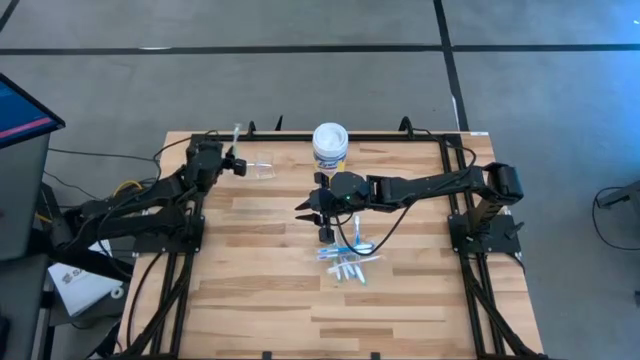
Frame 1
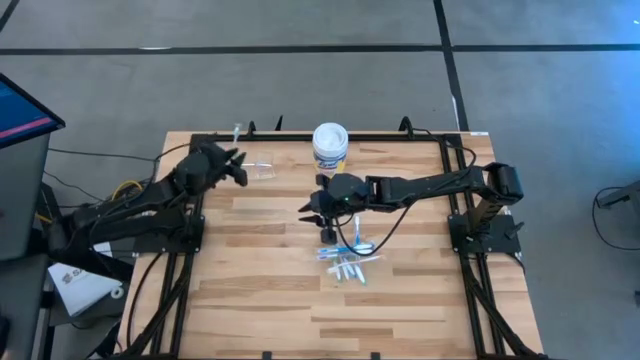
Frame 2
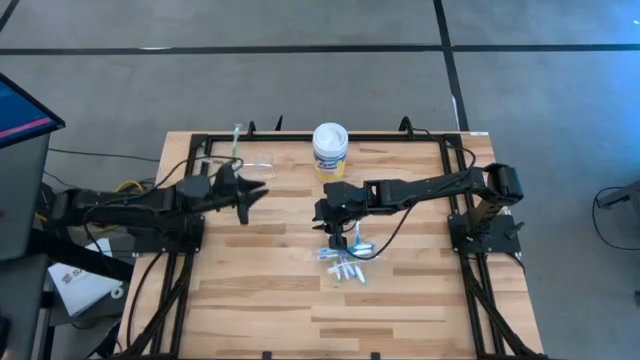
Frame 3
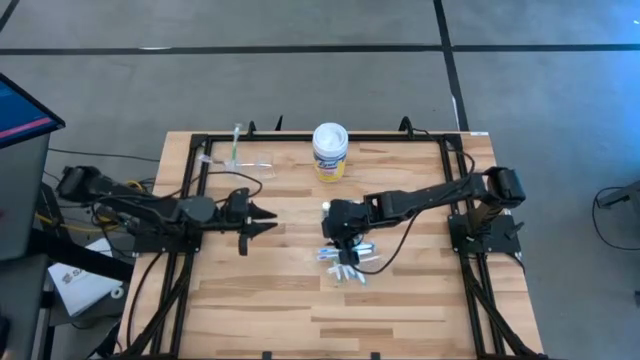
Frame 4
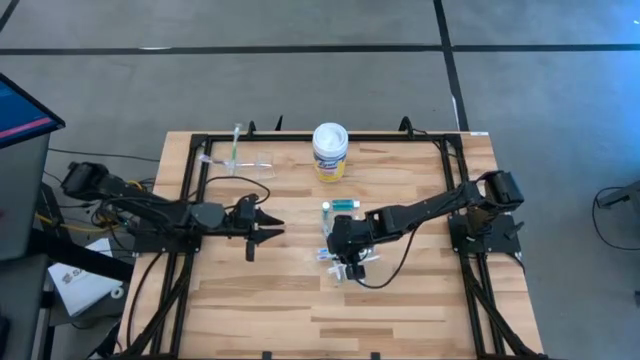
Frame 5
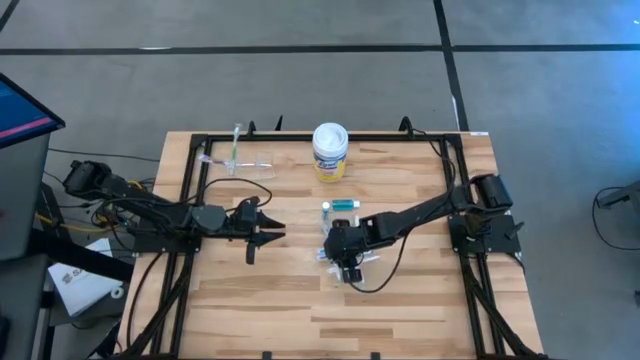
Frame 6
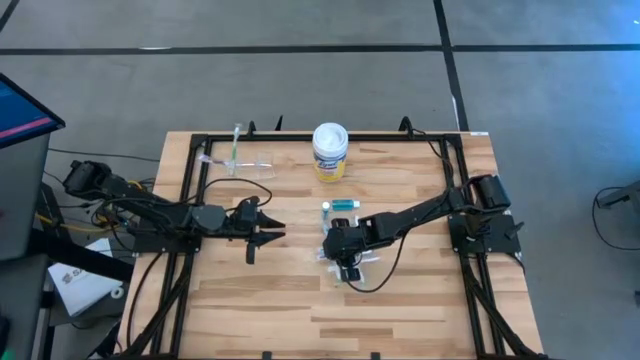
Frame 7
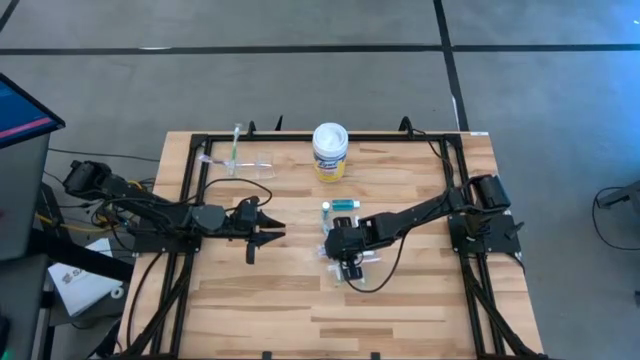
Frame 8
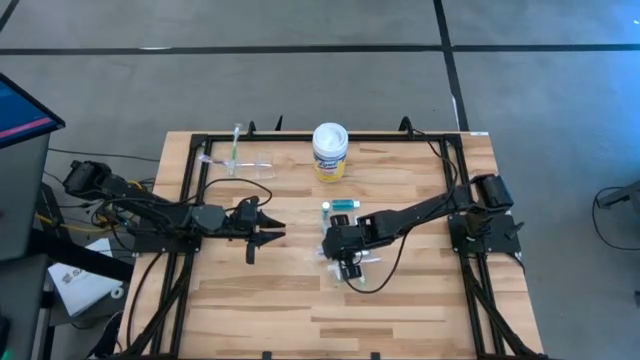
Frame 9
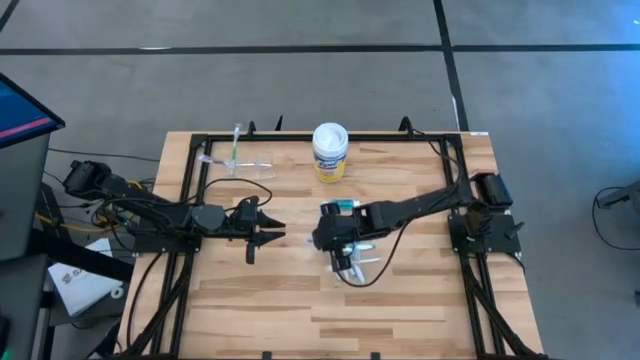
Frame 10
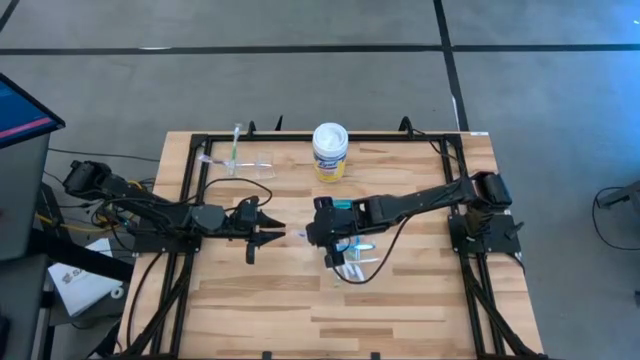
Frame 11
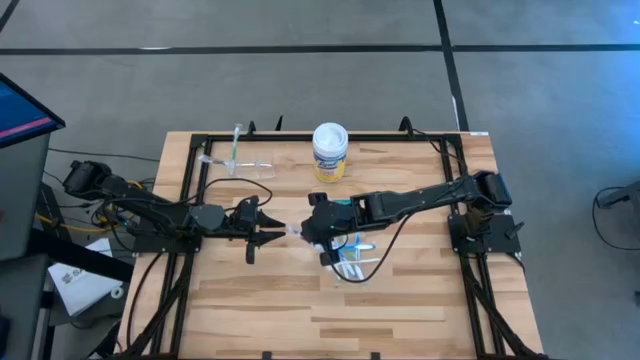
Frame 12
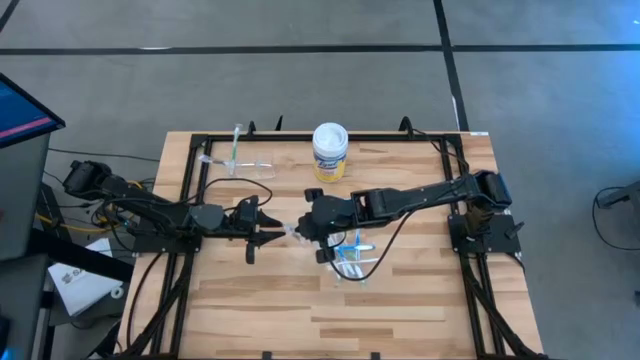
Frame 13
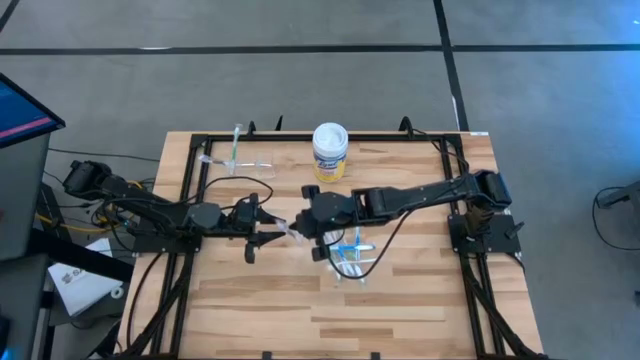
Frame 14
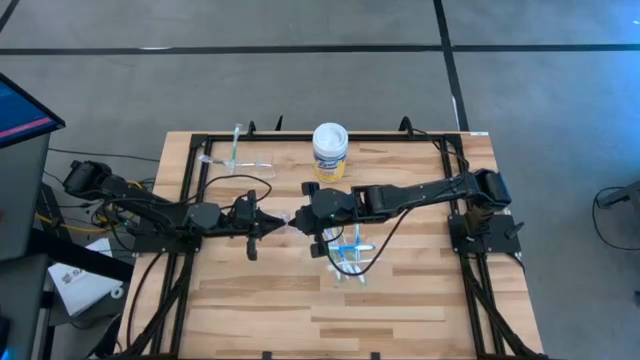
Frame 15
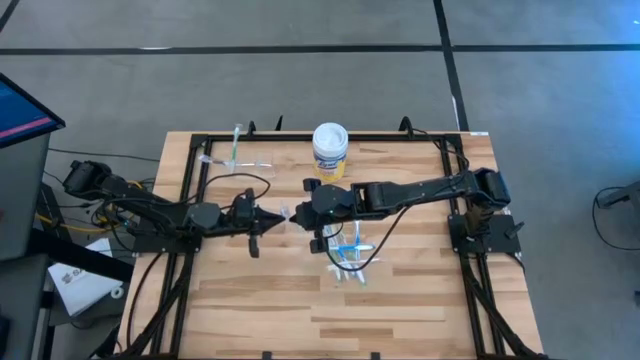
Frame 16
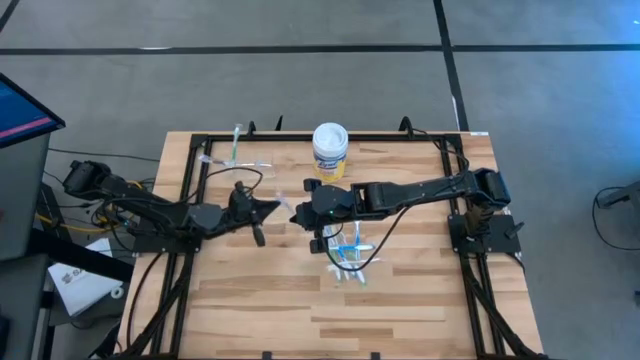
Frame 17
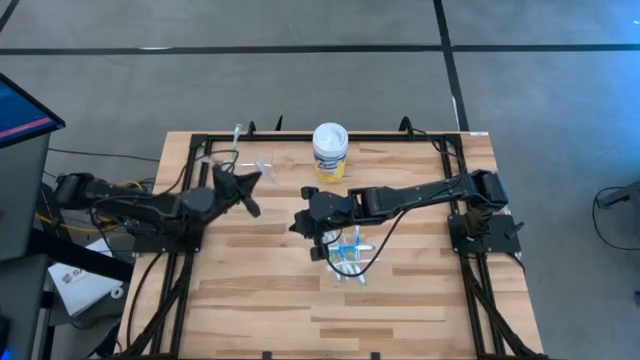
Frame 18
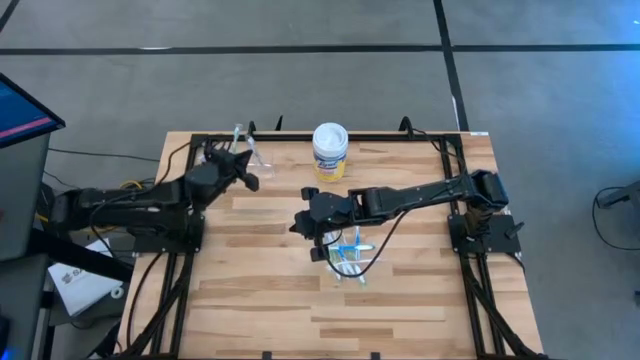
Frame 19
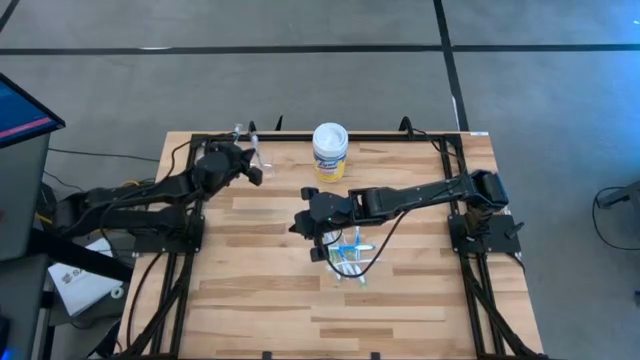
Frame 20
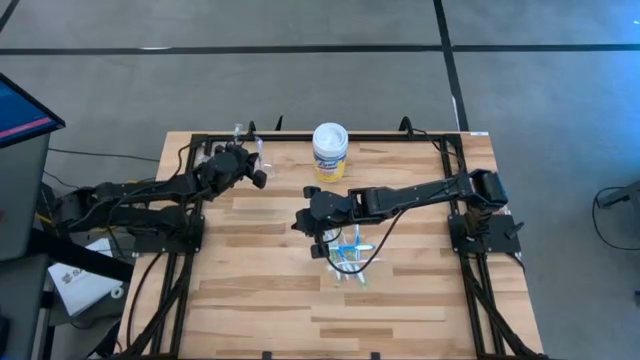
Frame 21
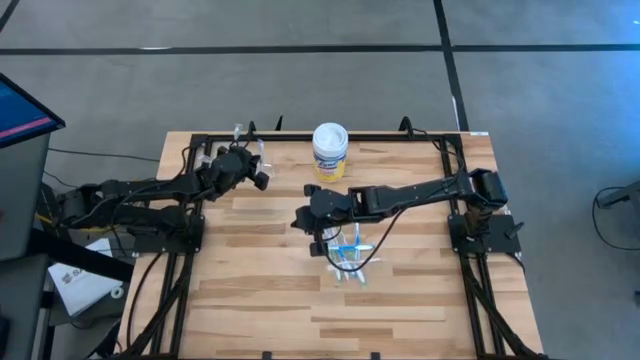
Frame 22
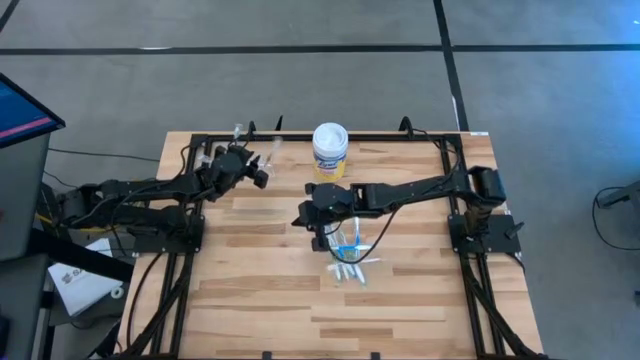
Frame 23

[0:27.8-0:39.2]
Task: Pick & Place toothbrushing station
Put the violet toothbrush into the transparent organizer

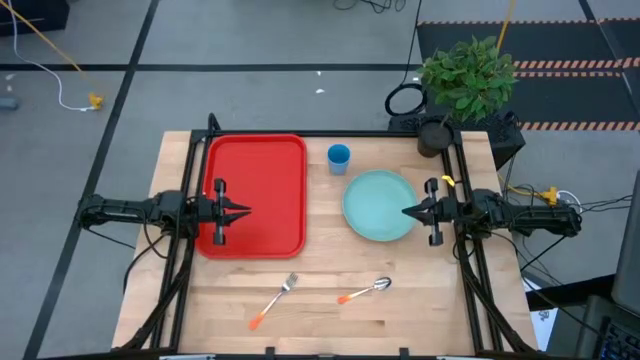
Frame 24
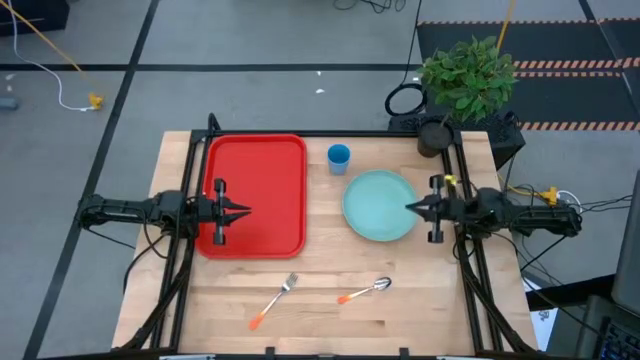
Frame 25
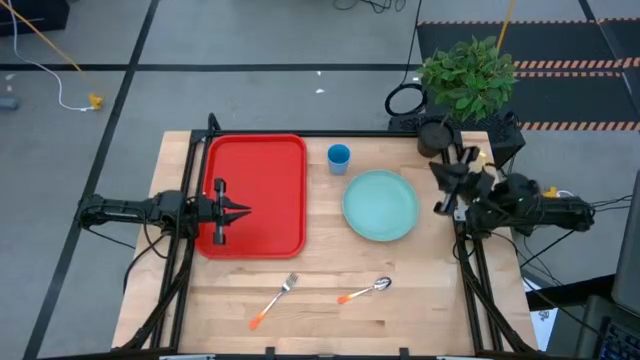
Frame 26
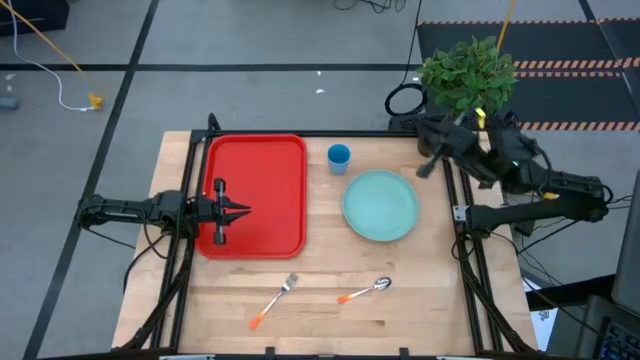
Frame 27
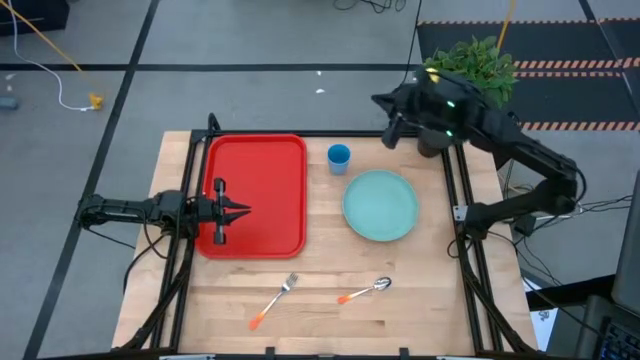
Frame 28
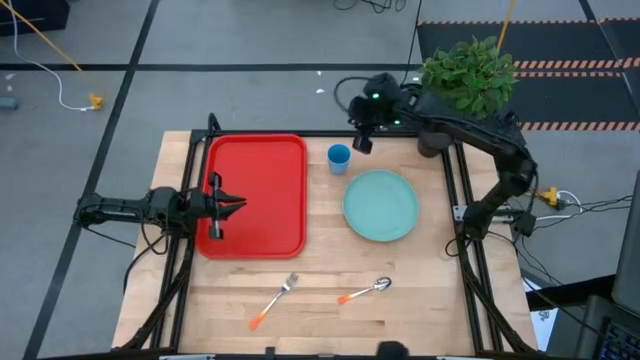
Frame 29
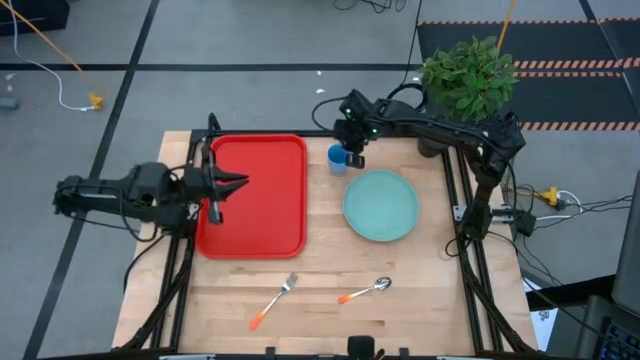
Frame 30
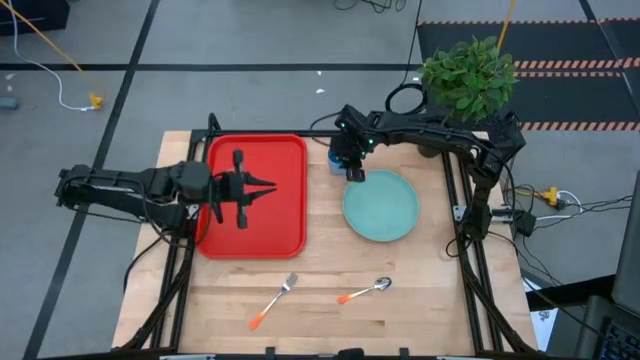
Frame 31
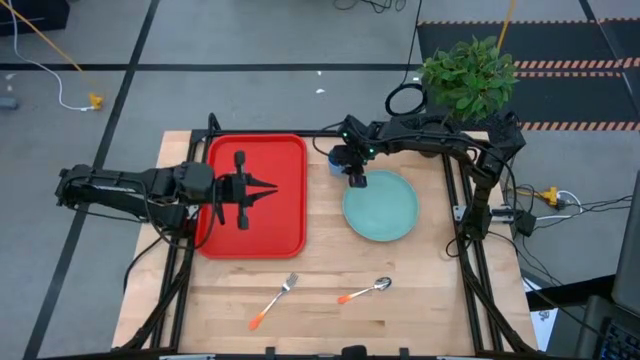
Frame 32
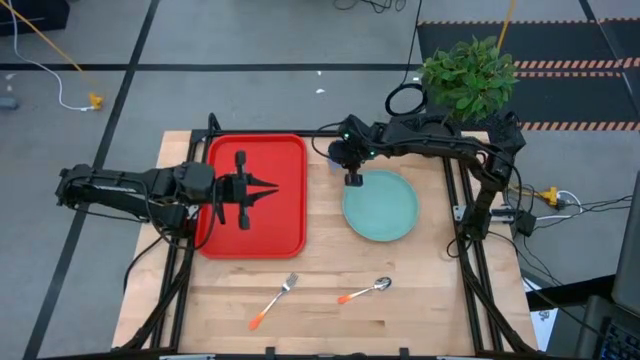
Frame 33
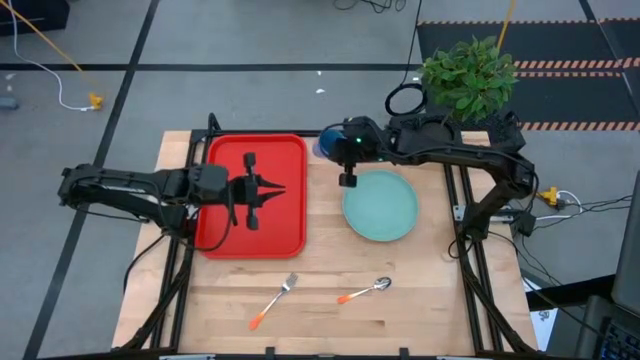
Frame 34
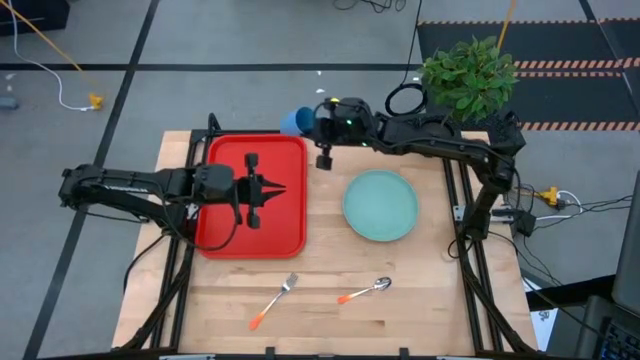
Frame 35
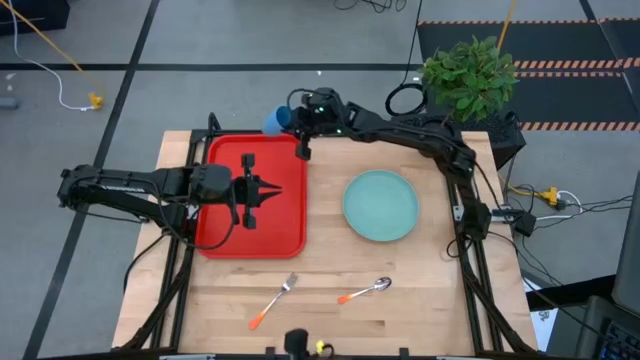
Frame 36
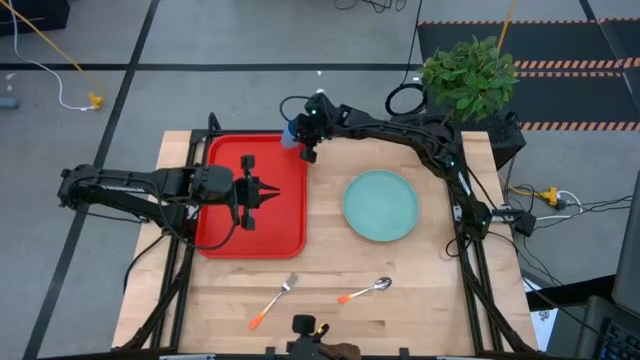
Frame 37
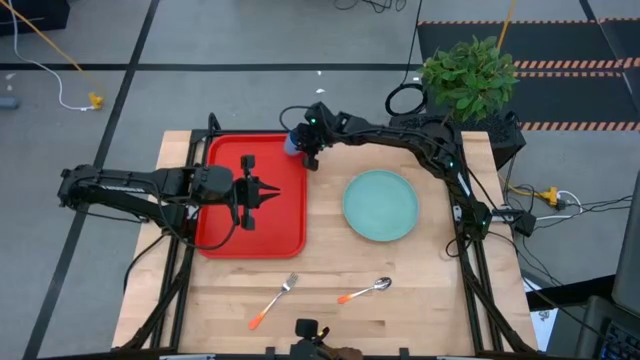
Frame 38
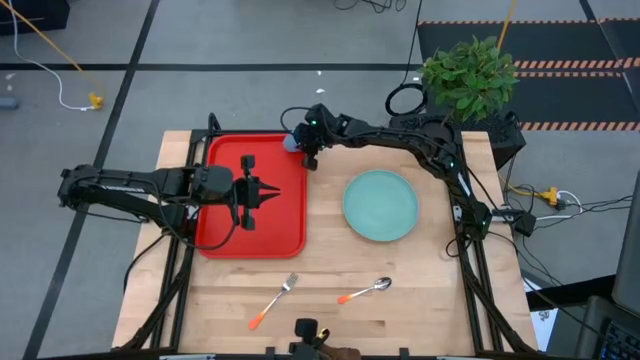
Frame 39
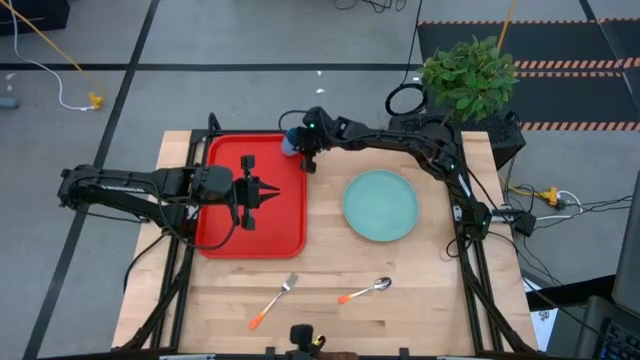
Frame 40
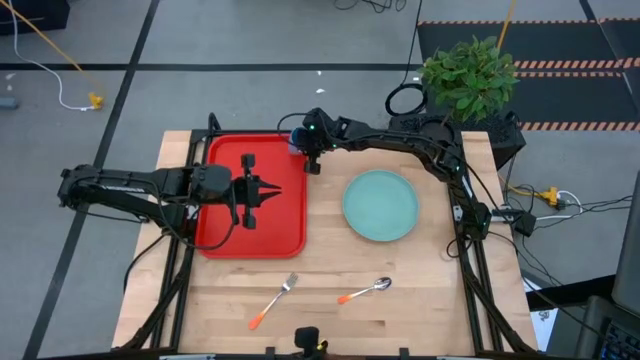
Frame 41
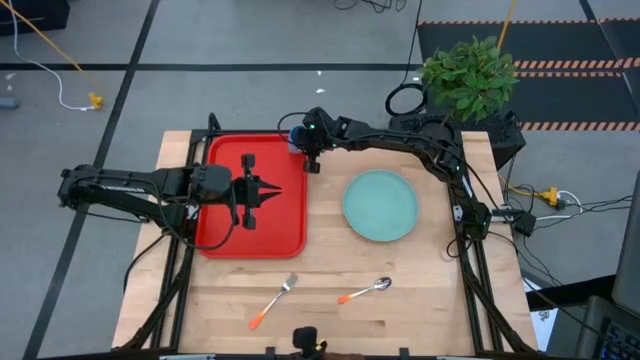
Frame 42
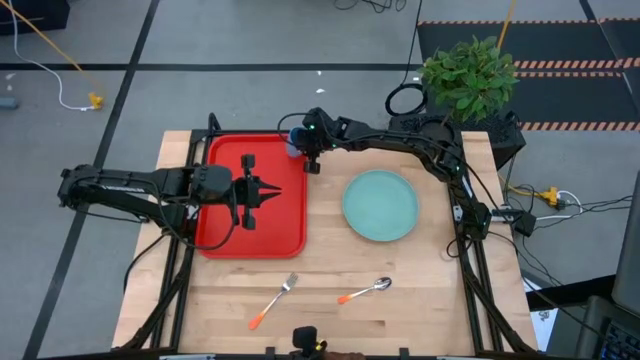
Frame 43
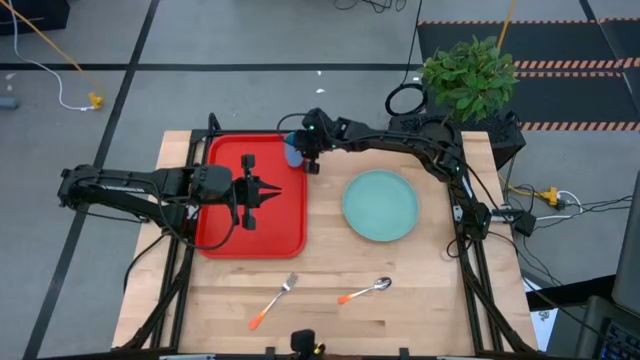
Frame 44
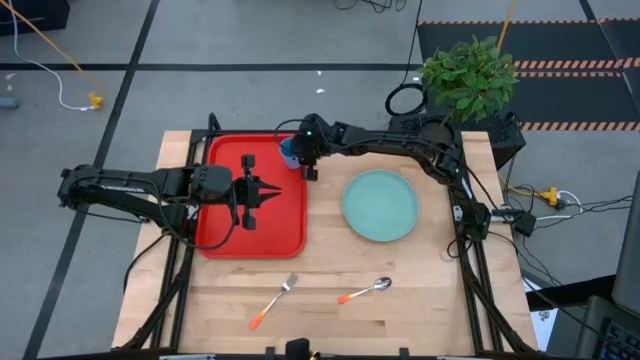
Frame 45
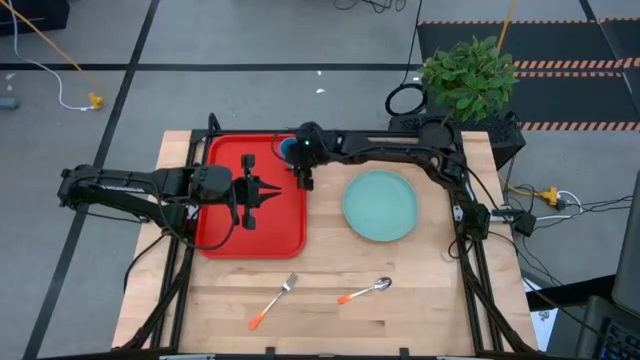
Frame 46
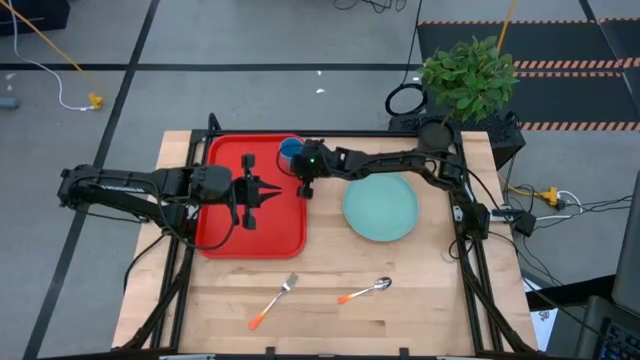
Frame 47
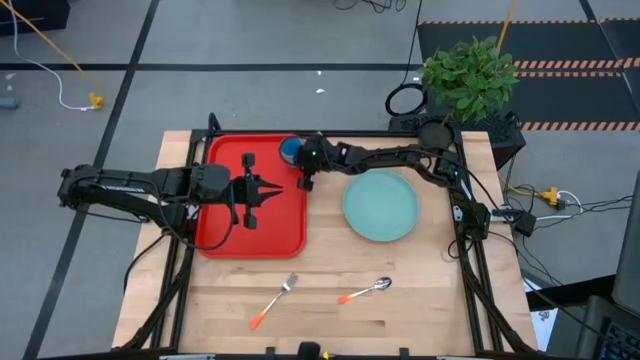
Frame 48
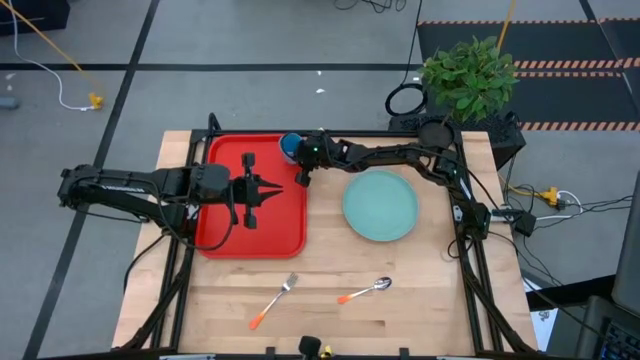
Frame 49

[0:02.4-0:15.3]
Task: Pick and place plate/cup/fork/spoon on tray
Put the blue cup on the red serving tray
